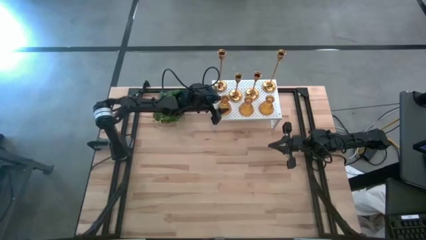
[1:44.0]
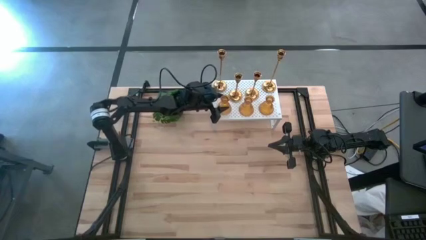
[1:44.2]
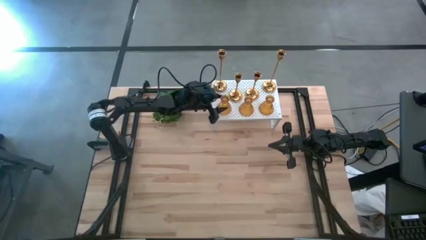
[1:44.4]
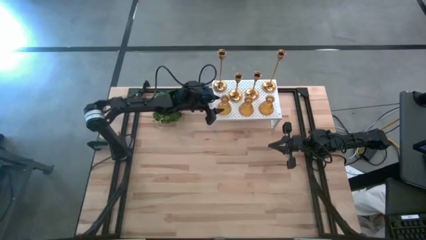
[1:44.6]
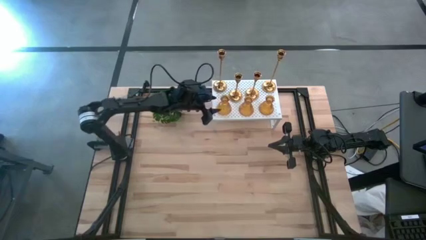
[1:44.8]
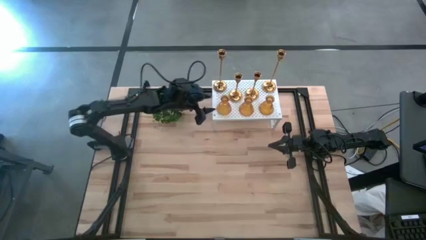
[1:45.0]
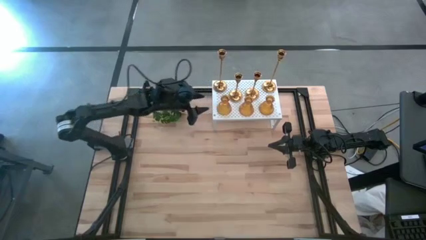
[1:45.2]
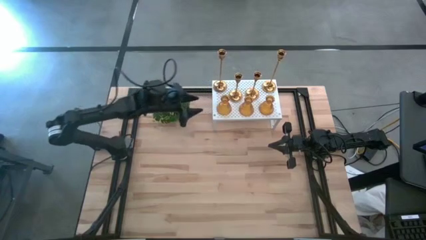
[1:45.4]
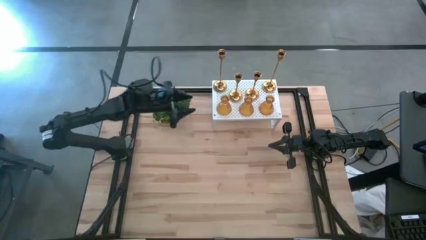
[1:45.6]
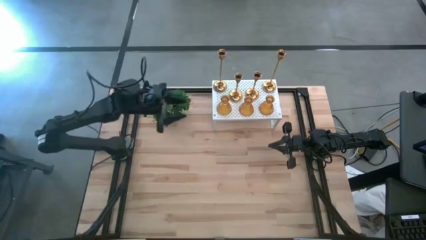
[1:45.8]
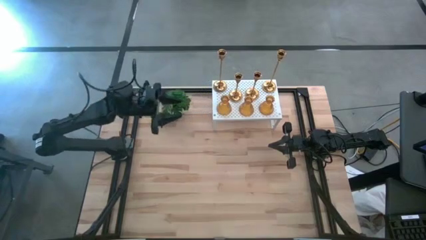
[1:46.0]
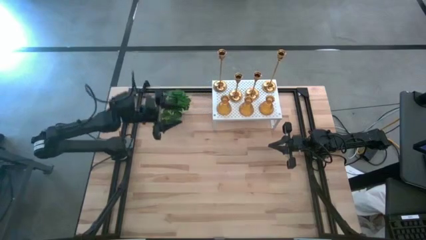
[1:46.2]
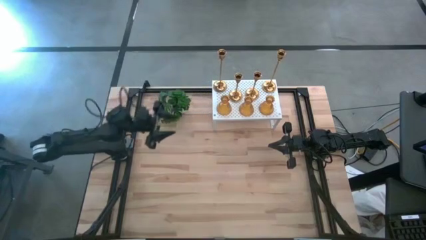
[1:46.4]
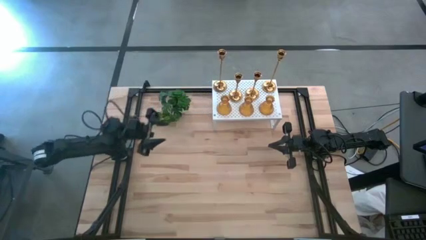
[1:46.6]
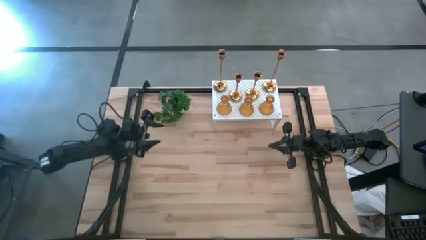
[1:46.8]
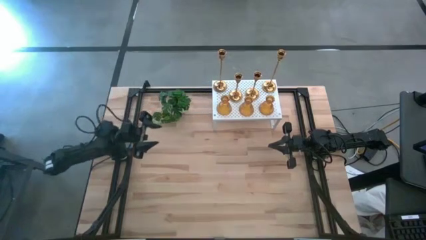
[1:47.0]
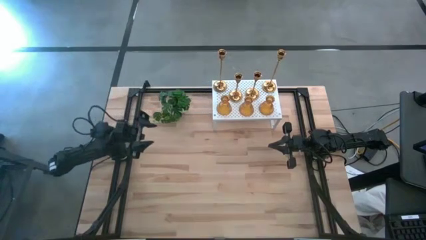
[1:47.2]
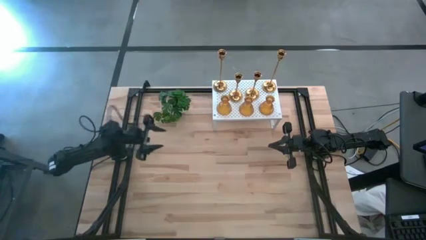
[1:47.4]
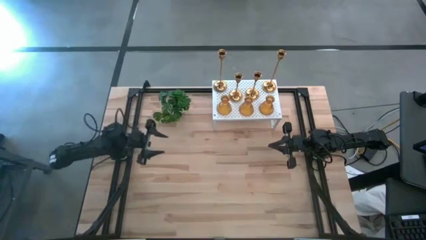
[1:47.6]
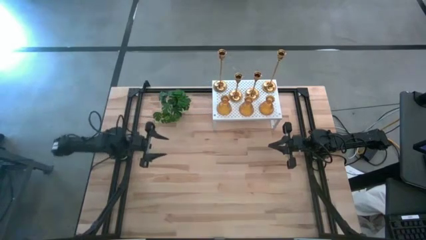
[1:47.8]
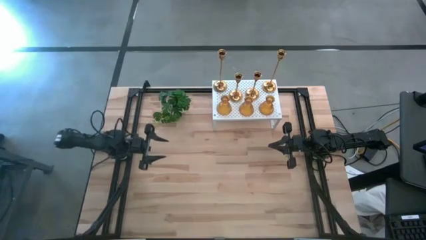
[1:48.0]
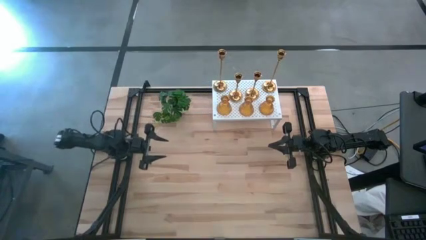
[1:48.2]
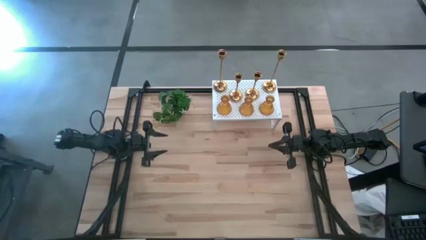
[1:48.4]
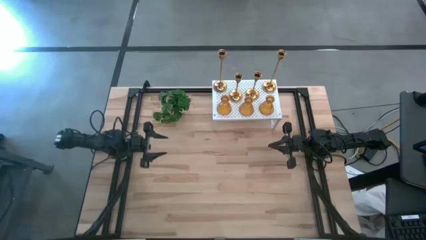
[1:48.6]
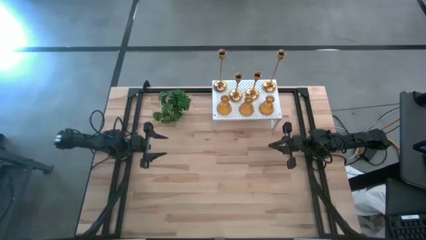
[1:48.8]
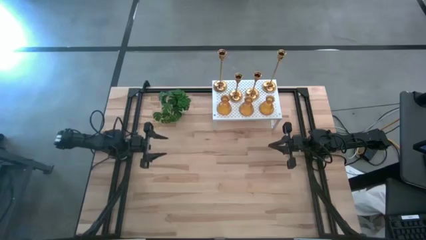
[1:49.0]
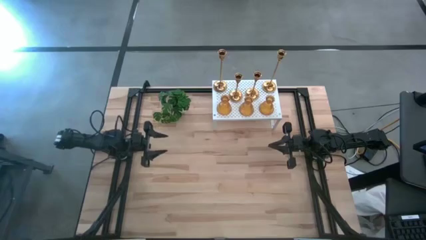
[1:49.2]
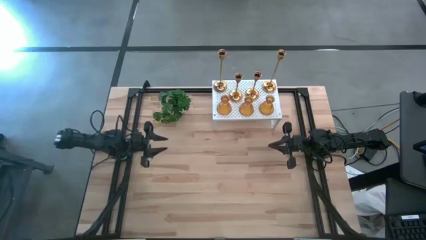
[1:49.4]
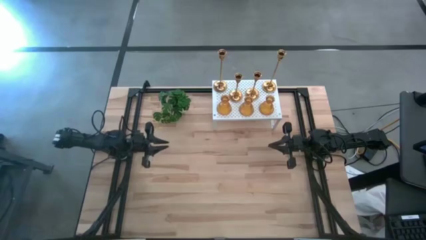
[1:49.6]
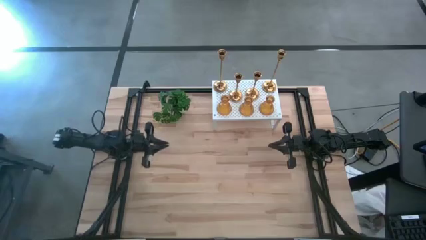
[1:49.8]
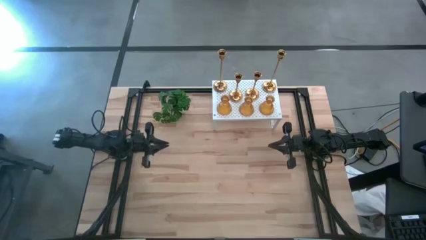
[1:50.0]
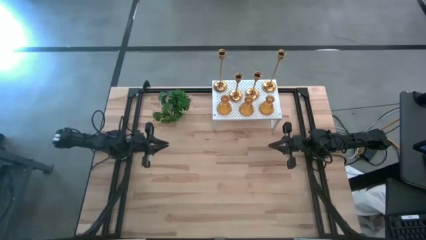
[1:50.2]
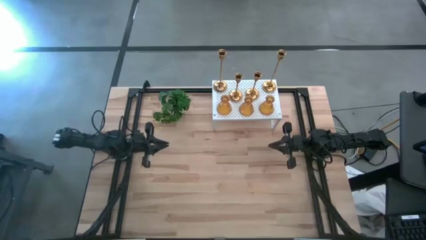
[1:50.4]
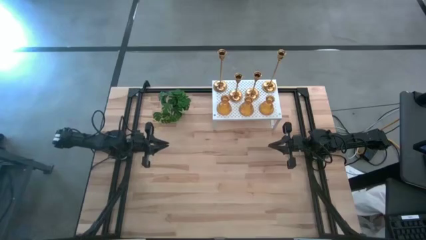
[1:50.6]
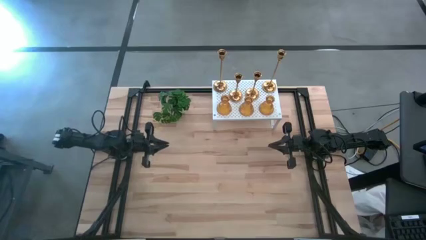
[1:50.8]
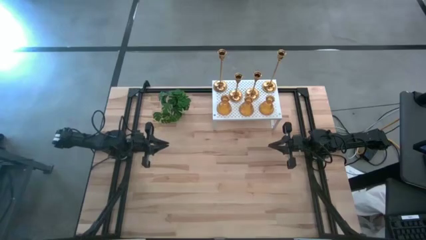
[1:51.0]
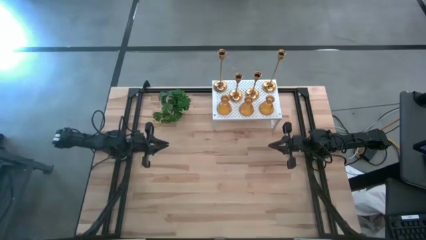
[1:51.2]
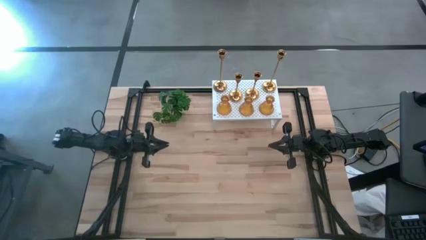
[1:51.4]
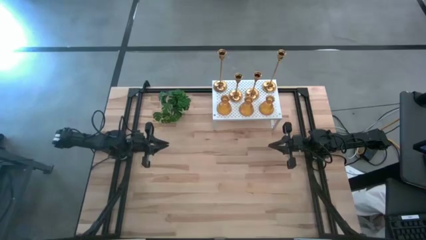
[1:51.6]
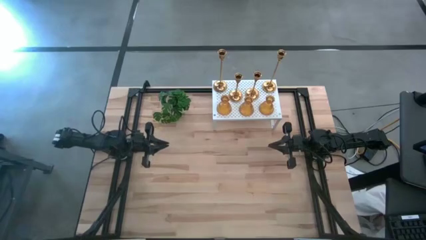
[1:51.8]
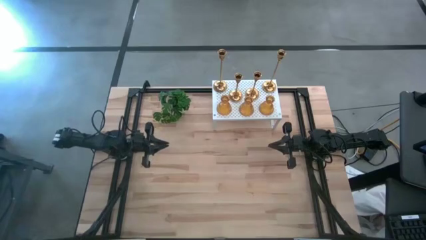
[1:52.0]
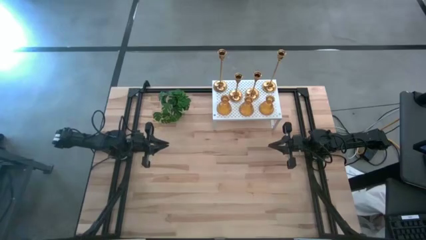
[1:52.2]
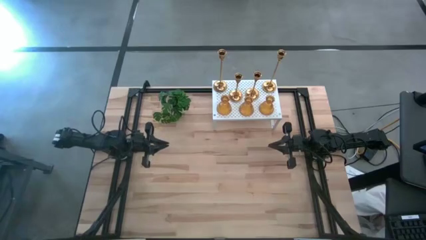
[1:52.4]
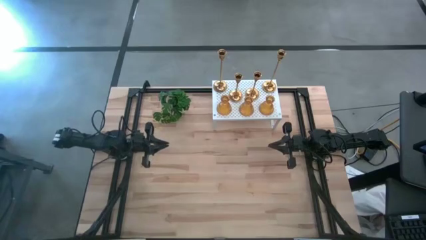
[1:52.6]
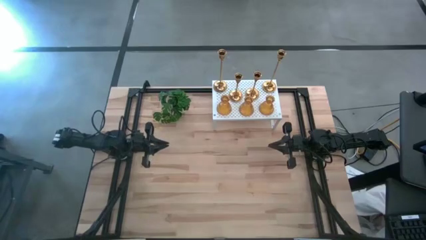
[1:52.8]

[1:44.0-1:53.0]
Task: Pick & Place candle stick holders
Return to Home Position

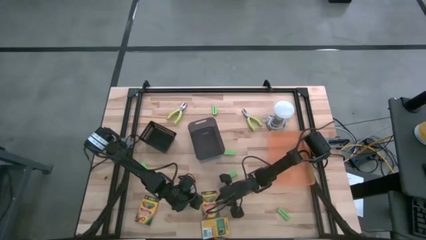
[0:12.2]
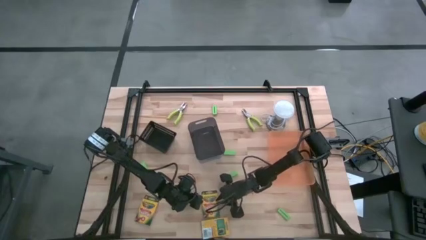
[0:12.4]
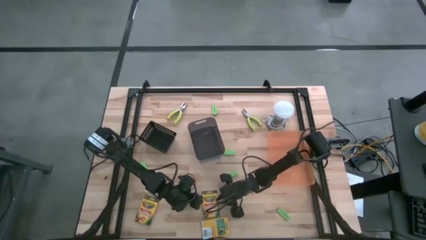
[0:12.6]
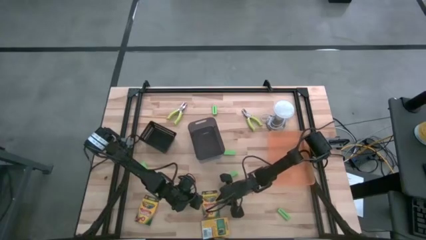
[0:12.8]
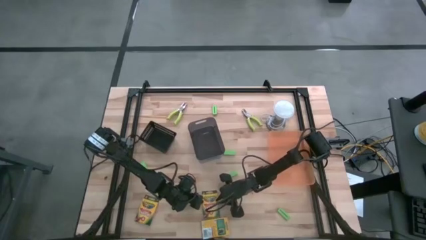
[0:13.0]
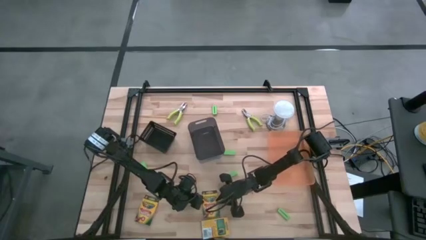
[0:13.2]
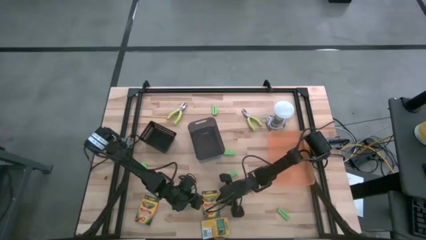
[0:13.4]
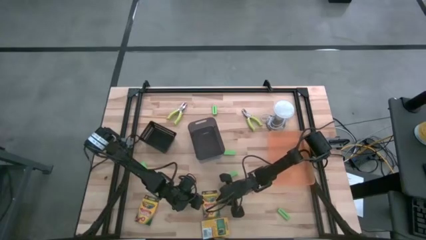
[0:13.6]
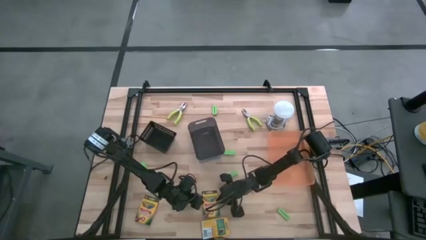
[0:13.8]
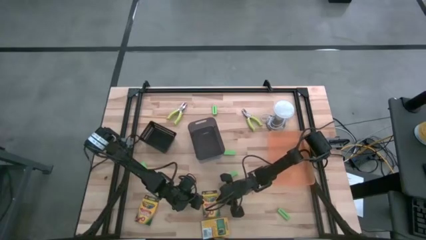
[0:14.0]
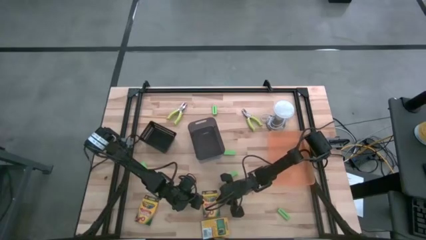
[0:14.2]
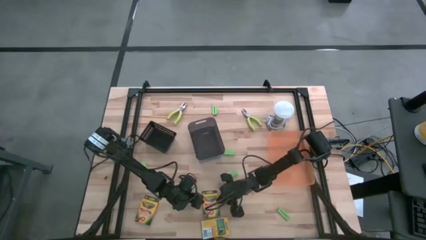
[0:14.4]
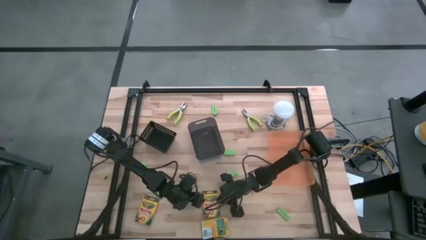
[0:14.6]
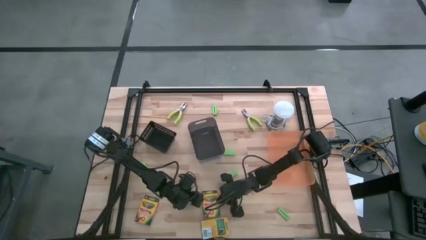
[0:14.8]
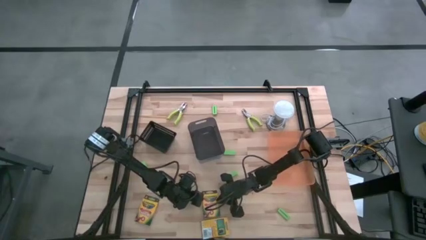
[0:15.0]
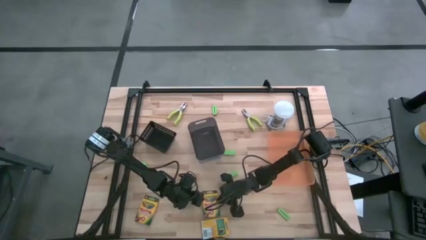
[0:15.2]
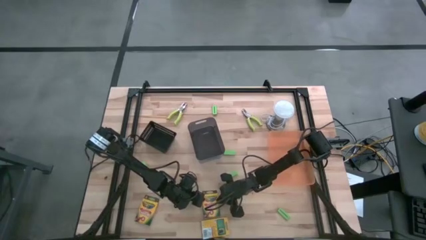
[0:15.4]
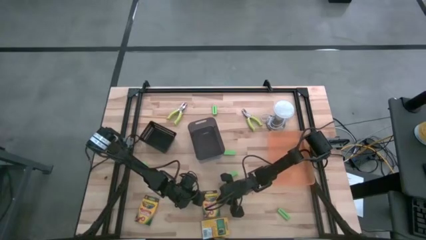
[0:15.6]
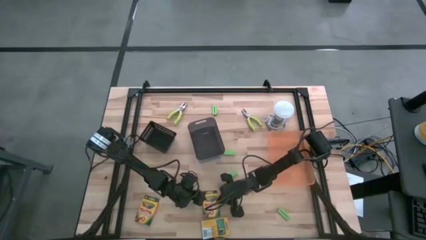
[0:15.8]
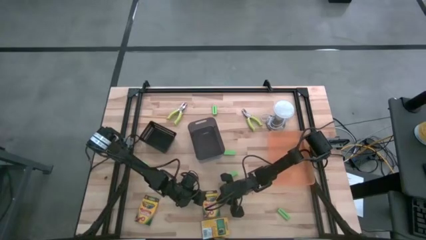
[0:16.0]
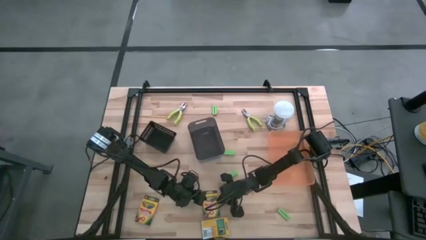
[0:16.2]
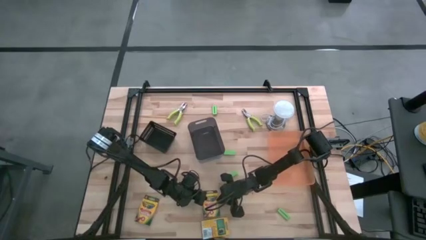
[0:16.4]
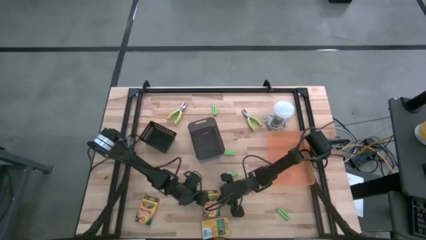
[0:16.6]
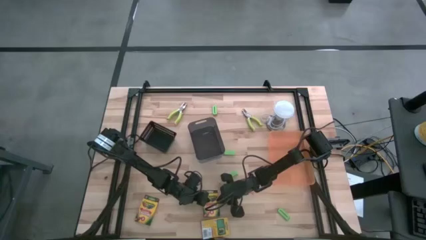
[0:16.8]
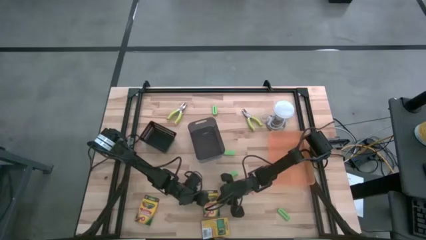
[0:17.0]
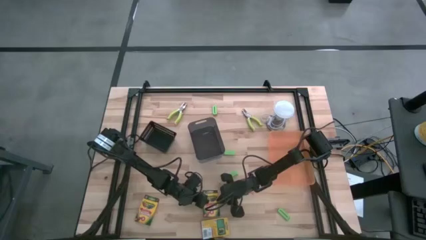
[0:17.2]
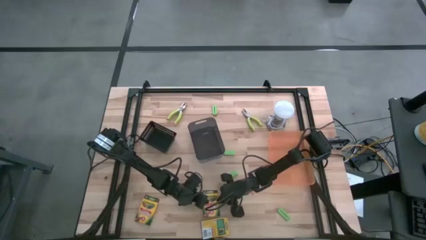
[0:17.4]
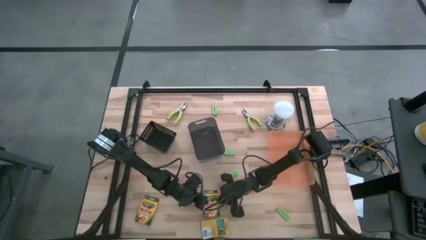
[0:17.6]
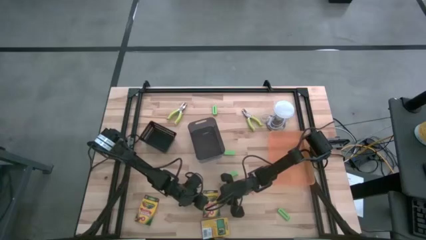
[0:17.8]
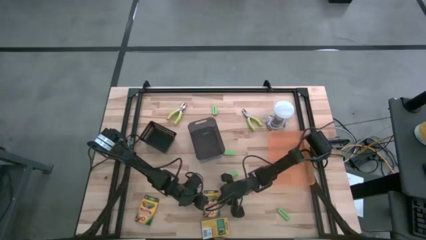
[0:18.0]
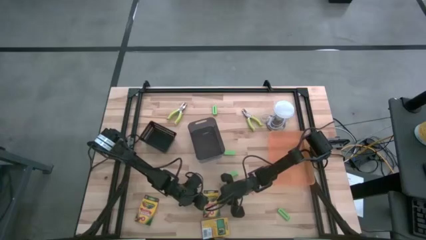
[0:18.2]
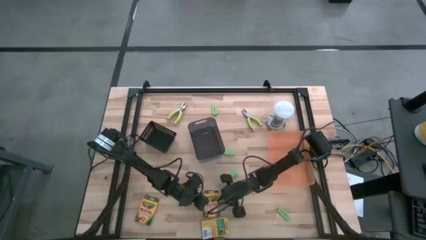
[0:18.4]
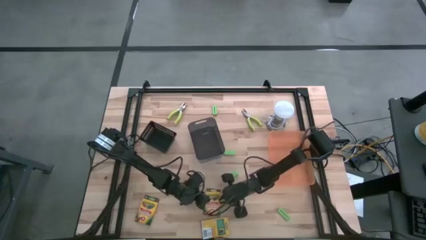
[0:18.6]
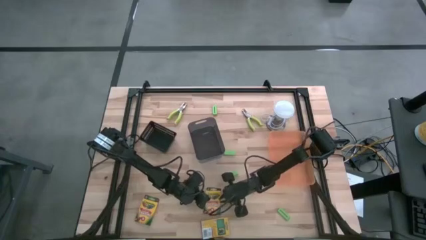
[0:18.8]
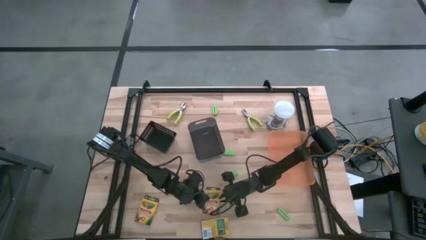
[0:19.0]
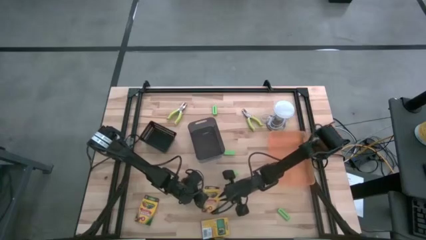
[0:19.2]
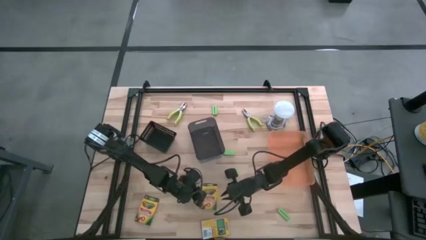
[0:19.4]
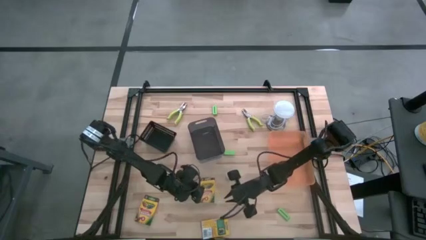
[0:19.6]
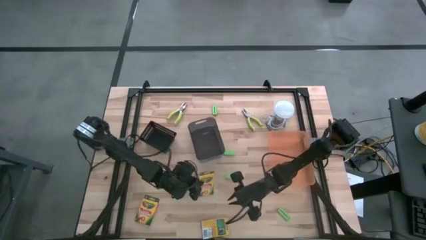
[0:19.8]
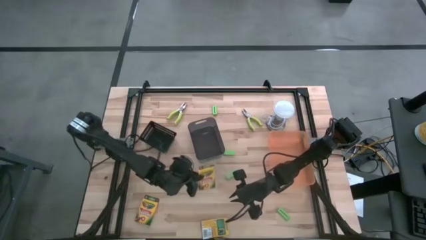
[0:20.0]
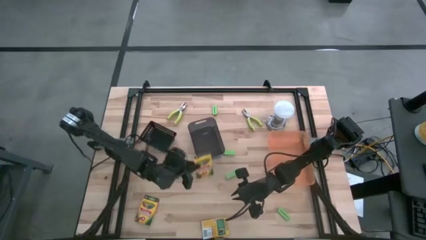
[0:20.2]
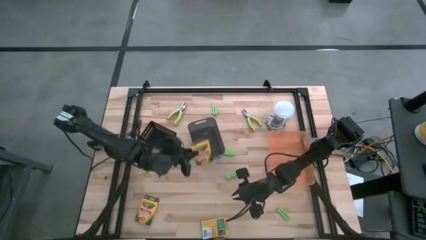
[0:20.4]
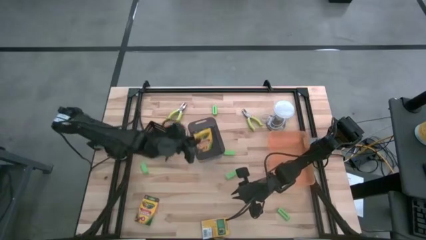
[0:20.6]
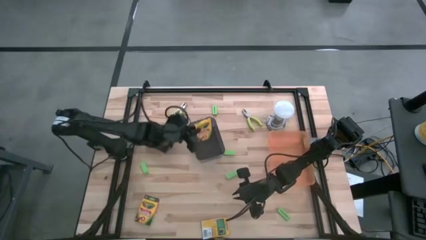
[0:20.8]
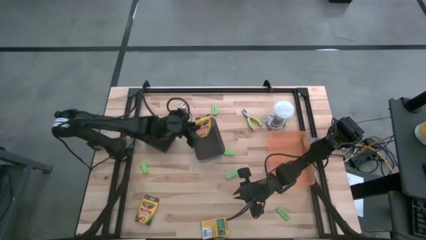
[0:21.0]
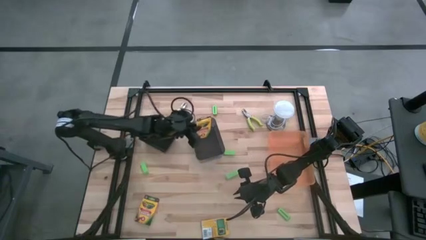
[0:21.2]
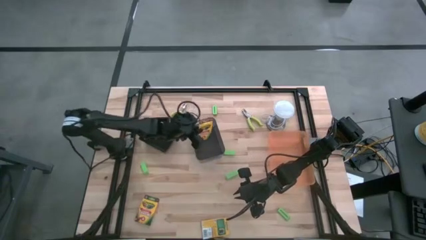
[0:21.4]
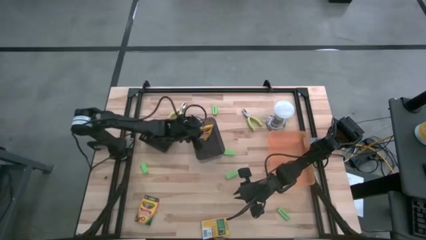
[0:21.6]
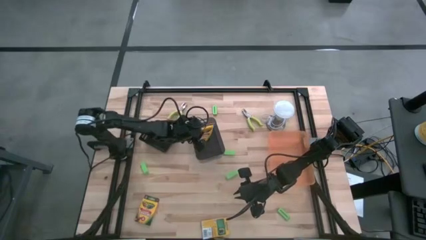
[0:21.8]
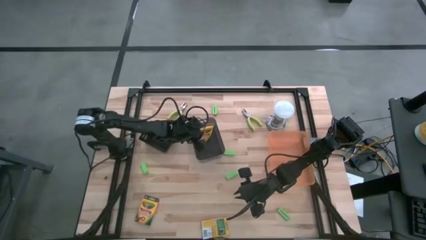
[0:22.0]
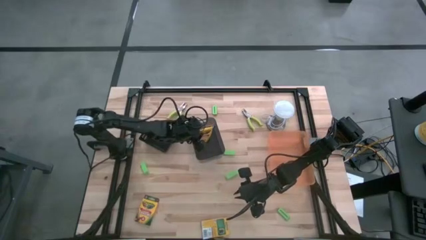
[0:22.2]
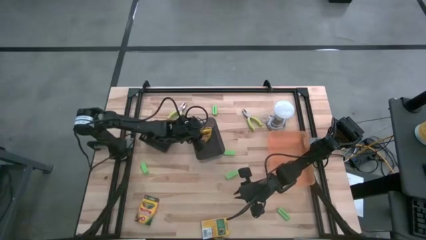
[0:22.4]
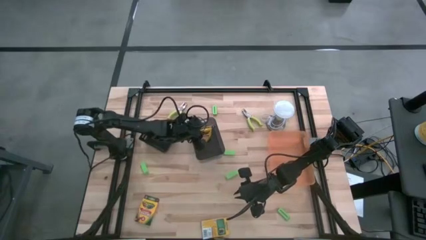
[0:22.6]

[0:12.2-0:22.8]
Task: Pick & Place School Supplies
Put the top right yellow crayon box into the black transparent bin
